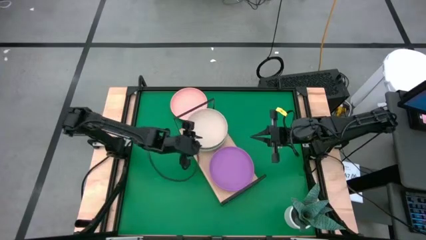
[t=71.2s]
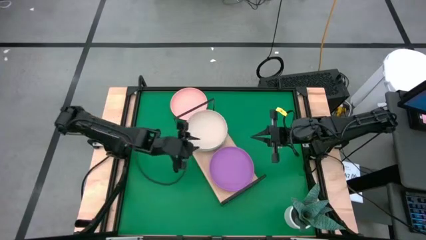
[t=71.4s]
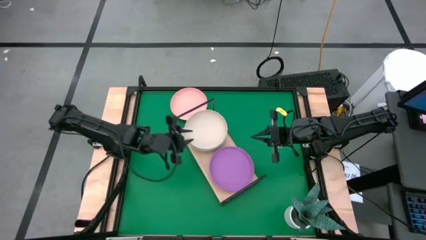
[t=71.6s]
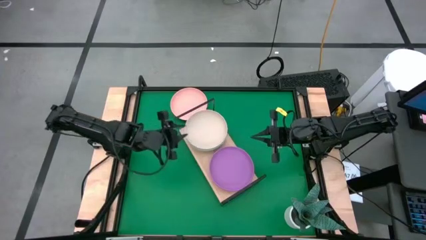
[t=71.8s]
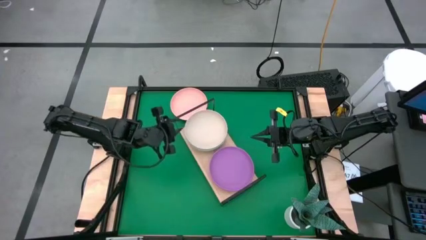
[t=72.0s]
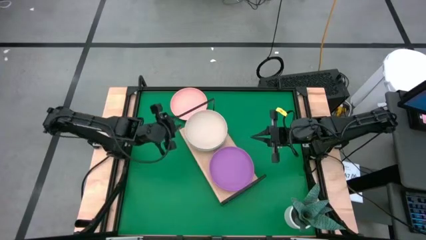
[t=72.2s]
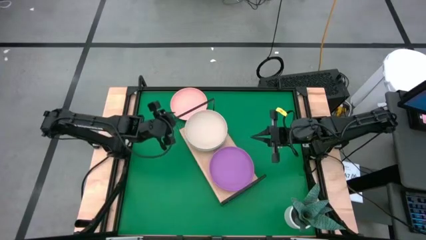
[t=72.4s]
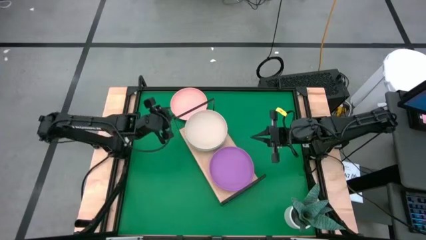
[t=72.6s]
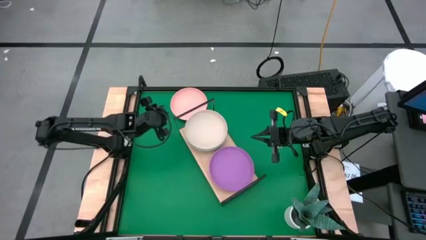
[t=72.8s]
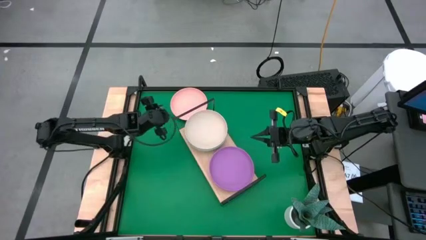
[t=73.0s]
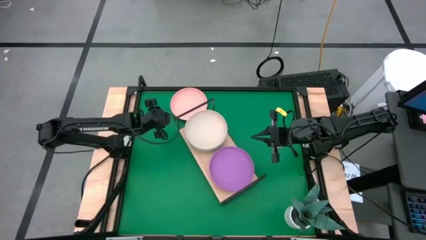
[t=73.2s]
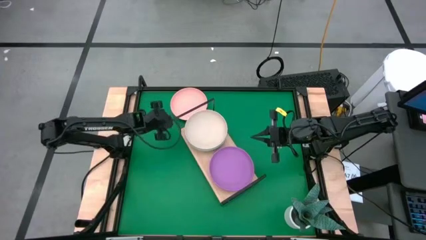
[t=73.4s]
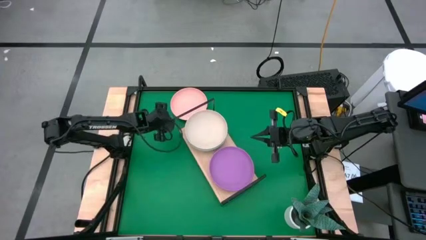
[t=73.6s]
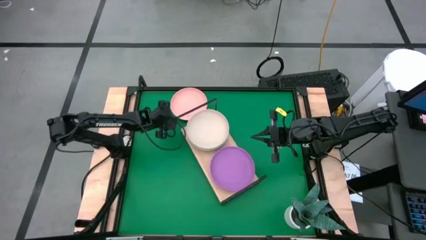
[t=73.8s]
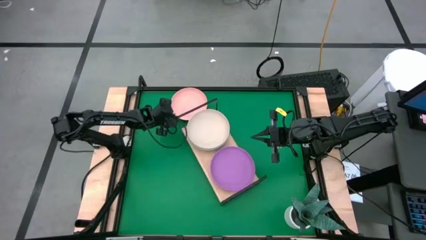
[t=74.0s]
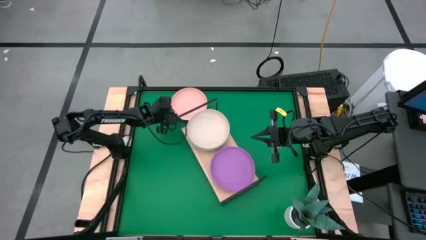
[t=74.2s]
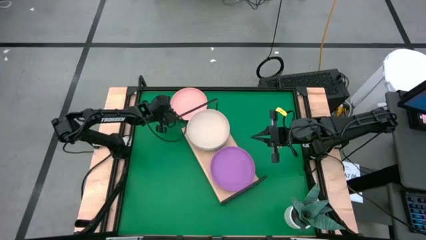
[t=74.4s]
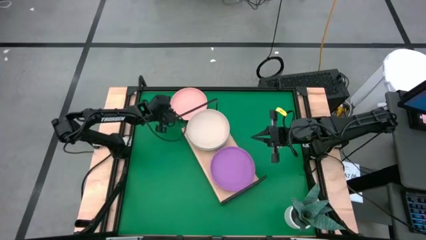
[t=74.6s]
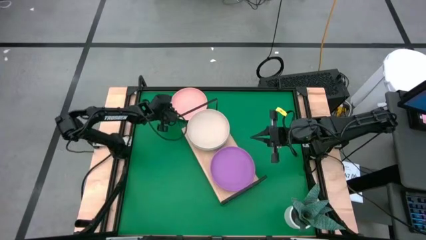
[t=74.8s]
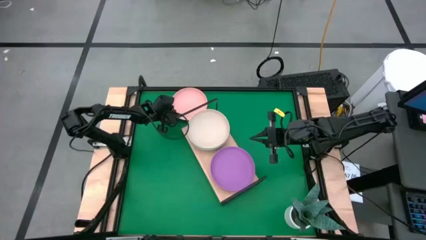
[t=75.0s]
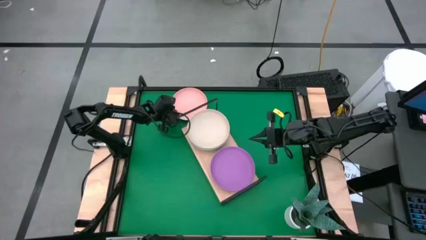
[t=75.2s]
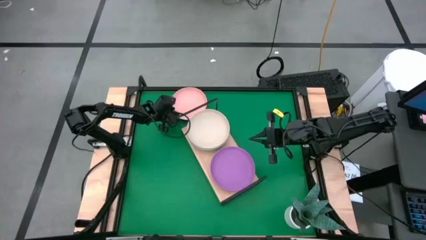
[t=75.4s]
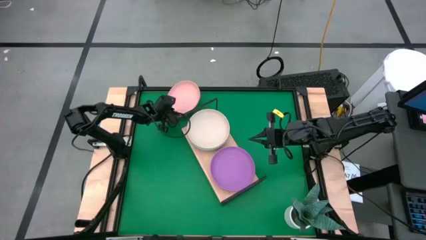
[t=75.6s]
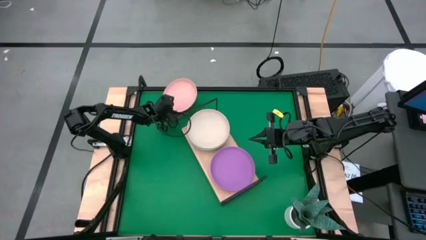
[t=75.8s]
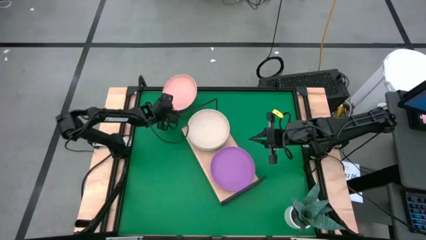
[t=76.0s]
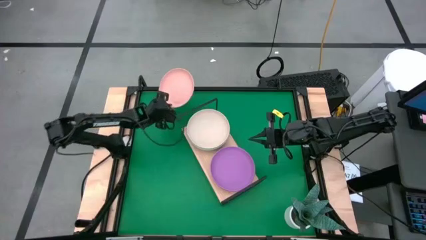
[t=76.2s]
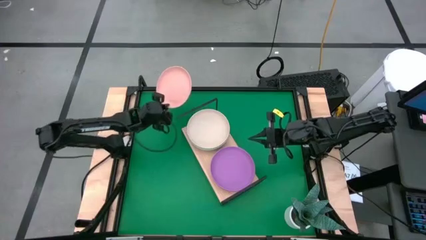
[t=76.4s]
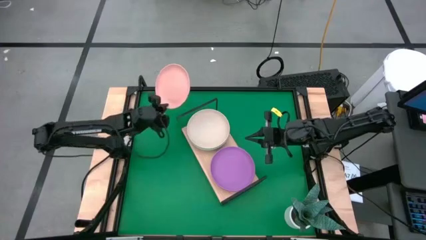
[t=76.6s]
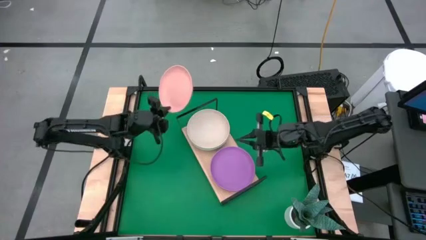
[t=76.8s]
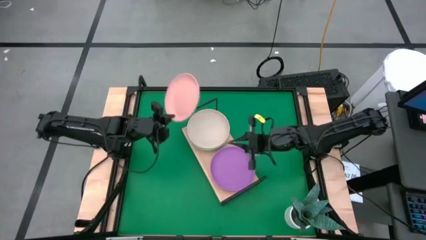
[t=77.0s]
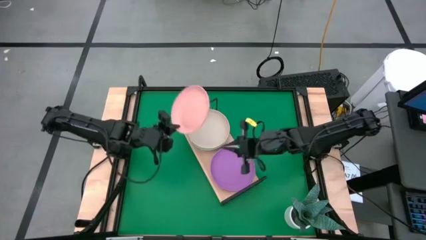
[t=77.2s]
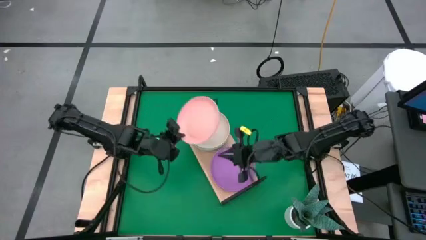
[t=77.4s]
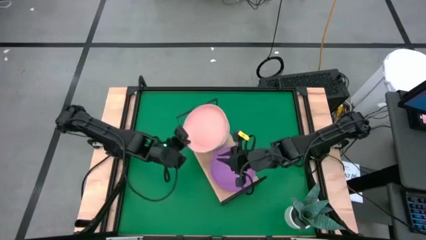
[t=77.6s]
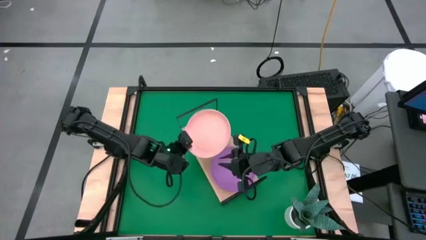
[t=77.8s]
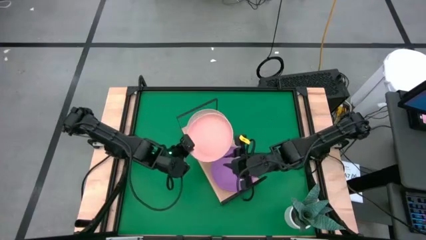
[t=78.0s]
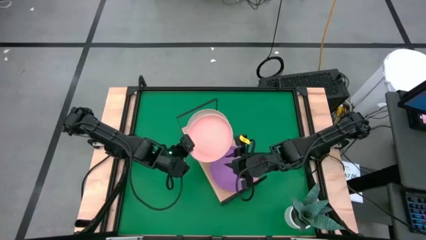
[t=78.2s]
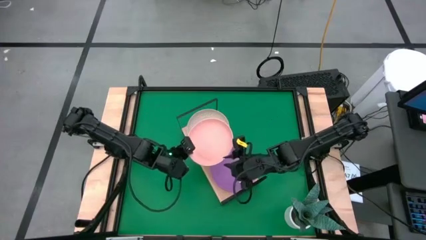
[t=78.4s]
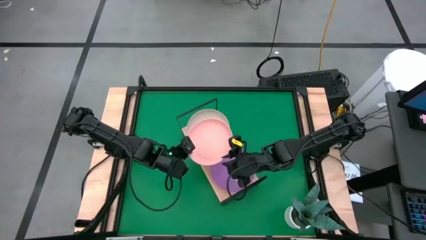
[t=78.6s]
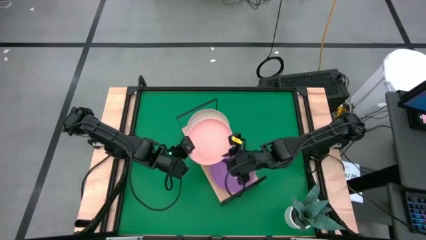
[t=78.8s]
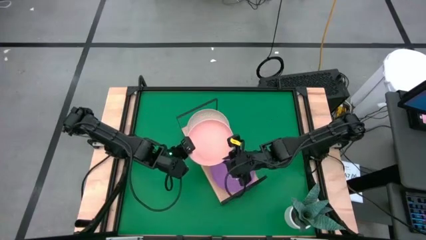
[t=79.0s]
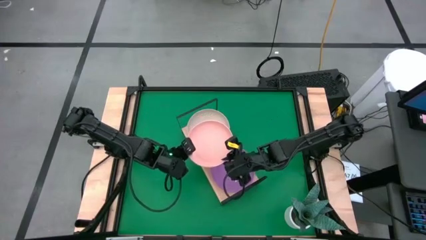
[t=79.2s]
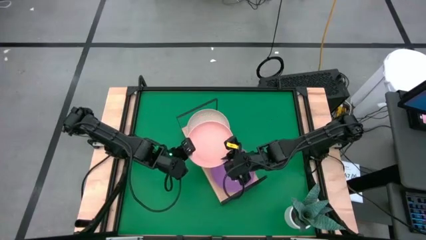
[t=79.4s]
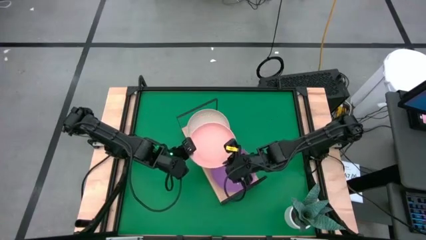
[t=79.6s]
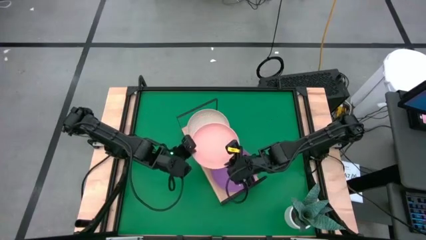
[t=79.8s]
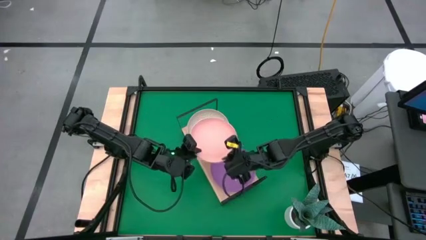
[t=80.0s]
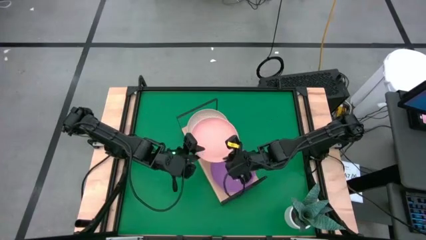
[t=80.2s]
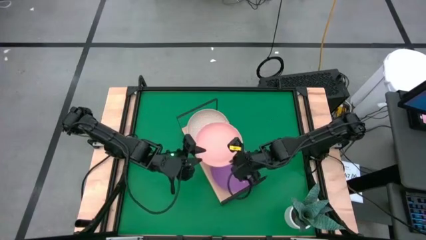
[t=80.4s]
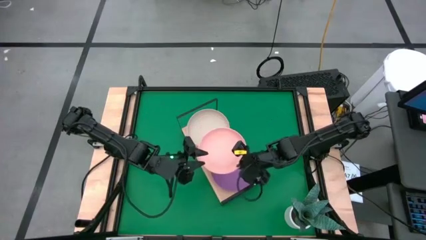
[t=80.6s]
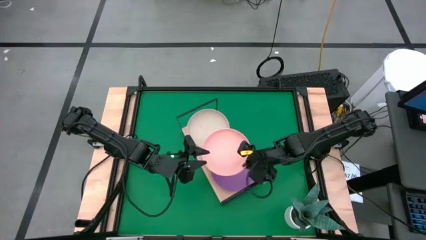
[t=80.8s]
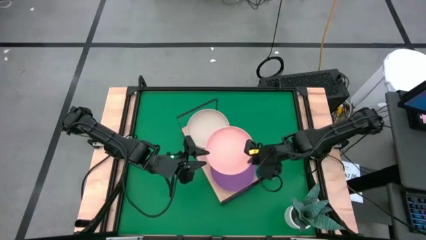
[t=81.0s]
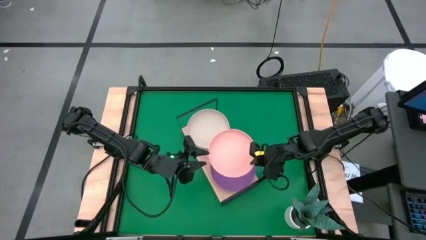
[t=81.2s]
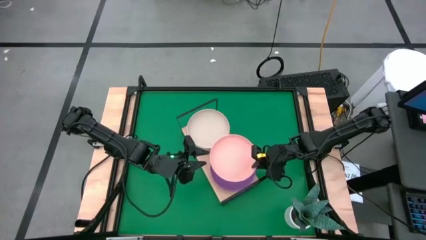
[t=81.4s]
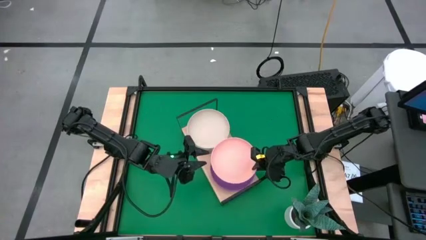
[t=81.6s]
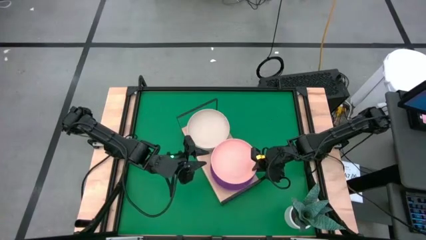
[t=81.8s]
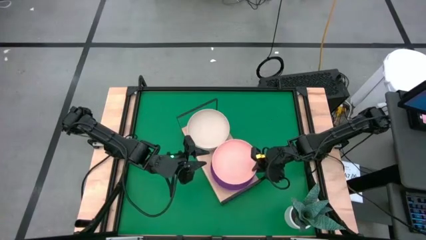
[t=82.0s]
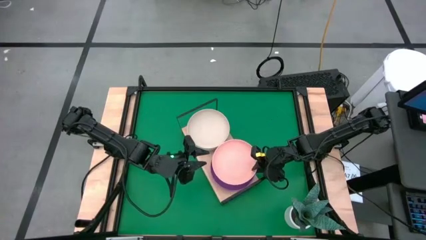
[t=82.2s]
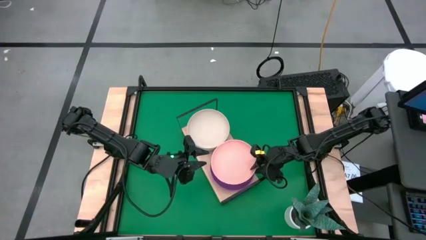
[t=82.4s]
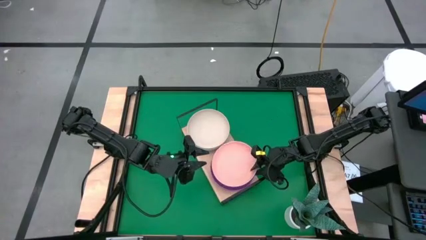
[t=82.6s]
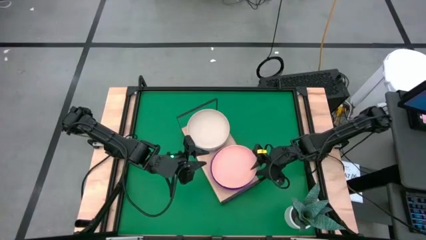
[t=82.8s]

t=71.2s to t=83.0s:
Task: Place and stack plates onto a shelf
Stack the orange plate on top of the violet plate on the shelf
